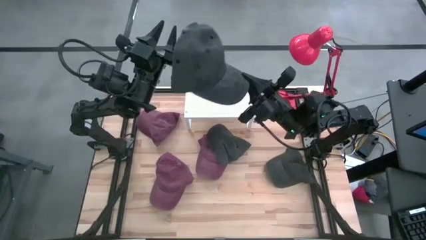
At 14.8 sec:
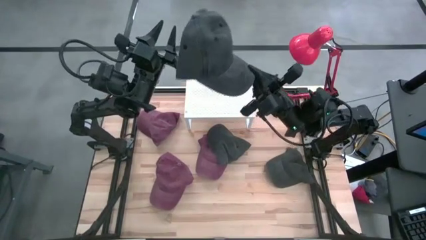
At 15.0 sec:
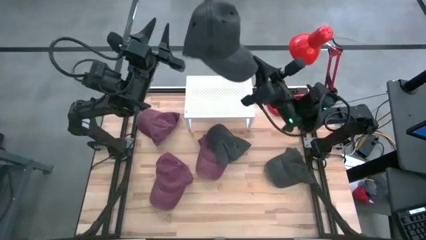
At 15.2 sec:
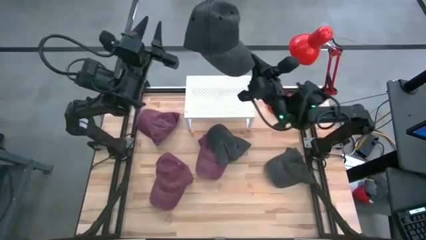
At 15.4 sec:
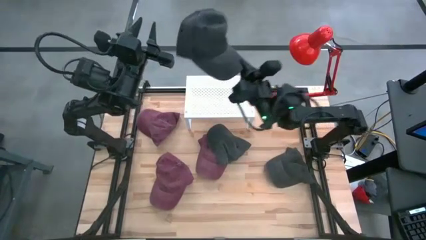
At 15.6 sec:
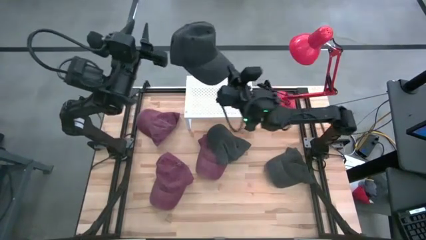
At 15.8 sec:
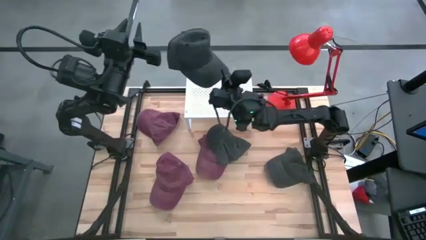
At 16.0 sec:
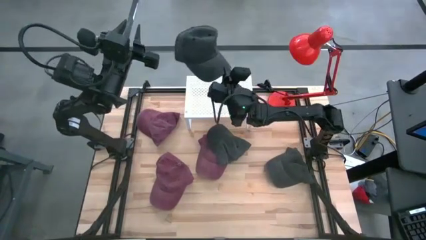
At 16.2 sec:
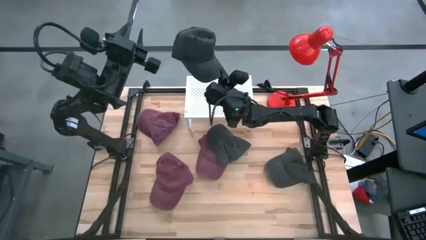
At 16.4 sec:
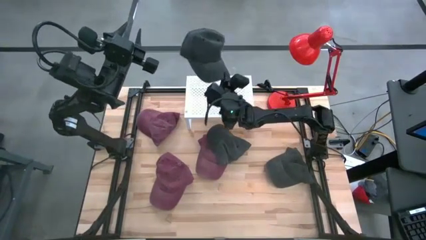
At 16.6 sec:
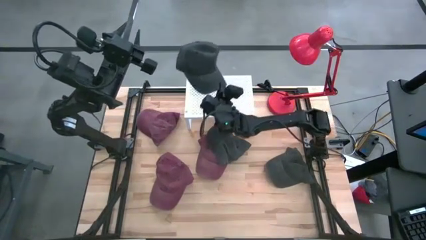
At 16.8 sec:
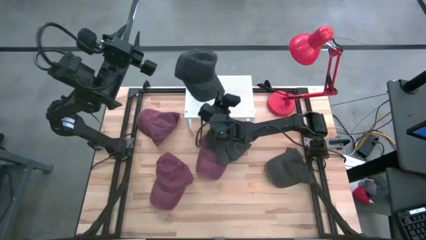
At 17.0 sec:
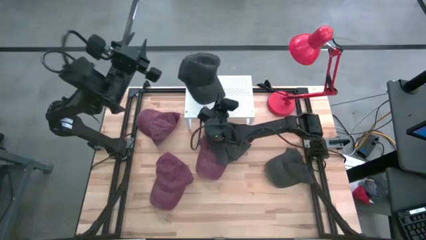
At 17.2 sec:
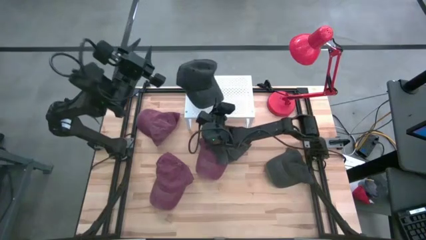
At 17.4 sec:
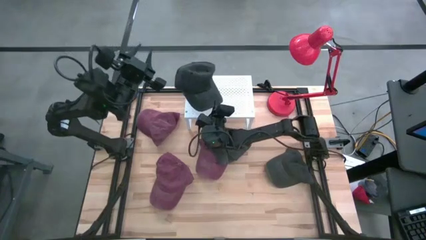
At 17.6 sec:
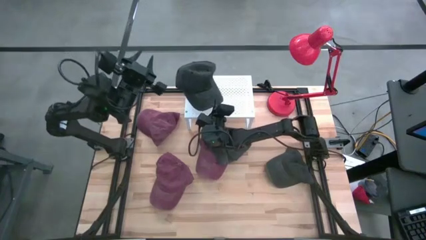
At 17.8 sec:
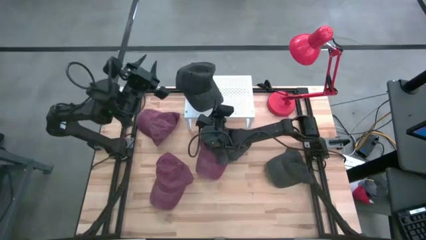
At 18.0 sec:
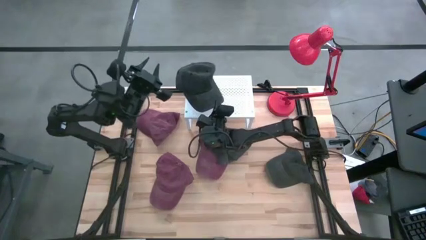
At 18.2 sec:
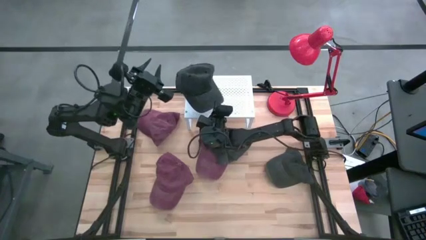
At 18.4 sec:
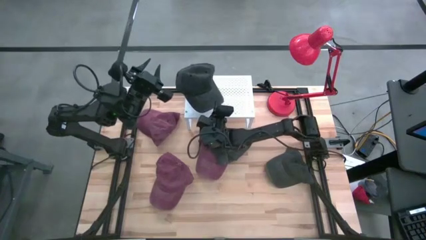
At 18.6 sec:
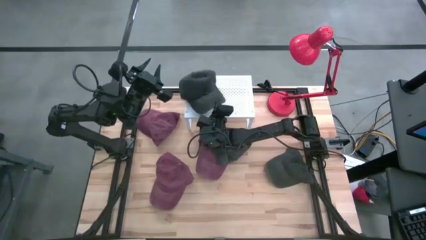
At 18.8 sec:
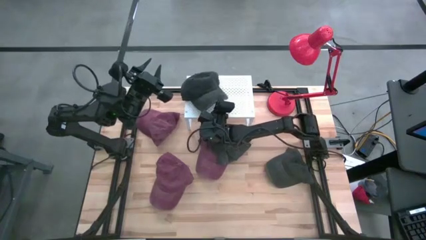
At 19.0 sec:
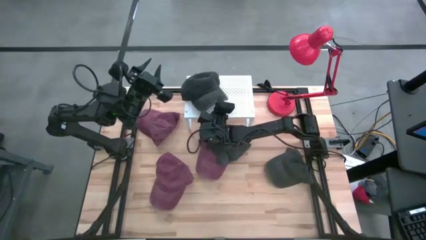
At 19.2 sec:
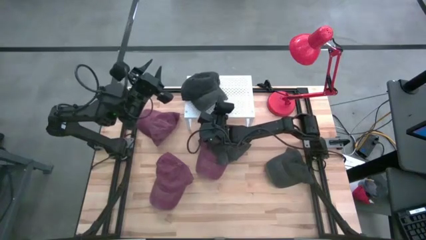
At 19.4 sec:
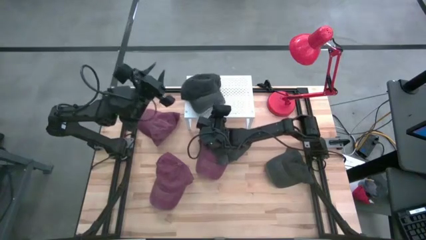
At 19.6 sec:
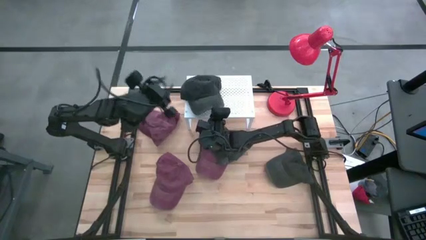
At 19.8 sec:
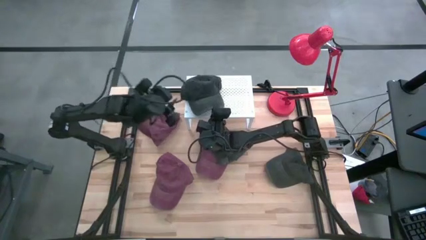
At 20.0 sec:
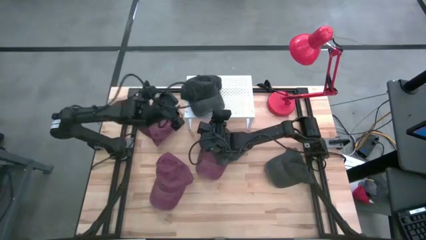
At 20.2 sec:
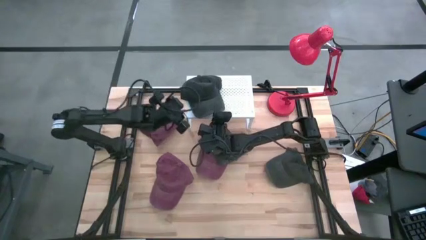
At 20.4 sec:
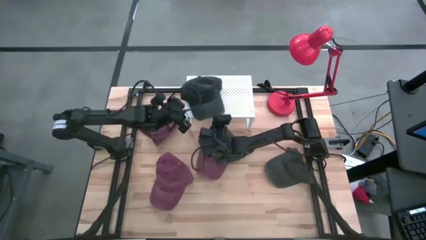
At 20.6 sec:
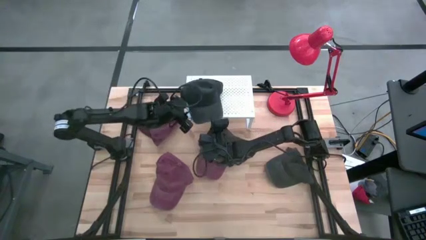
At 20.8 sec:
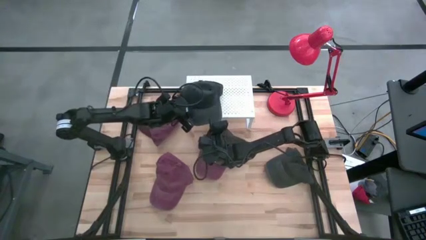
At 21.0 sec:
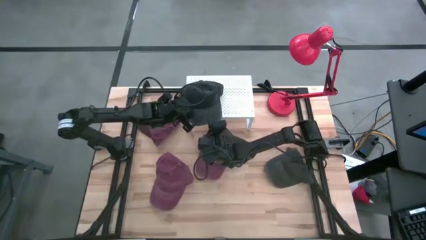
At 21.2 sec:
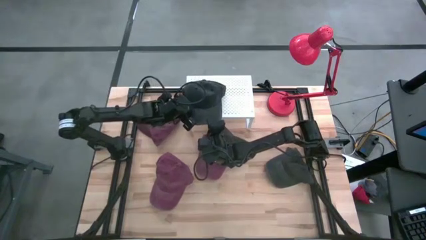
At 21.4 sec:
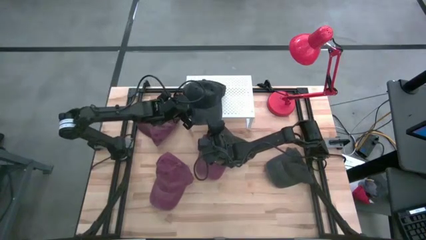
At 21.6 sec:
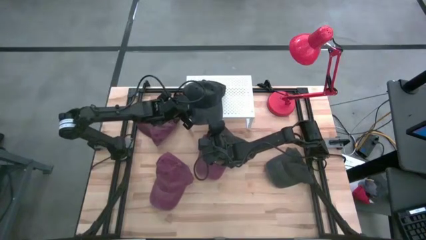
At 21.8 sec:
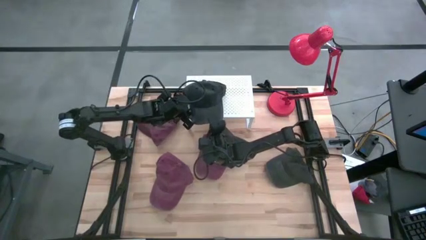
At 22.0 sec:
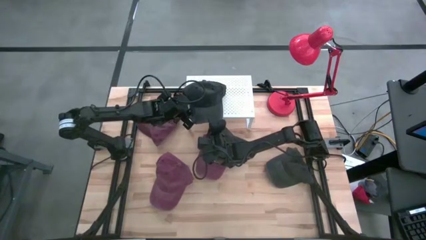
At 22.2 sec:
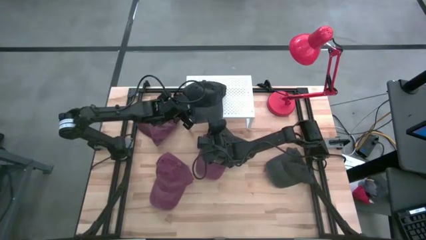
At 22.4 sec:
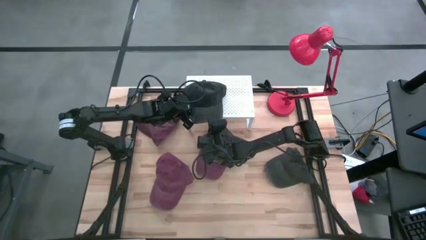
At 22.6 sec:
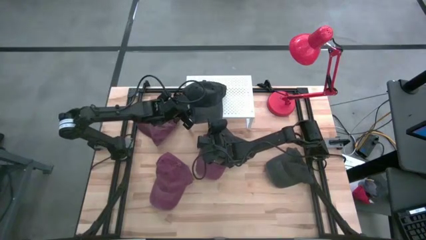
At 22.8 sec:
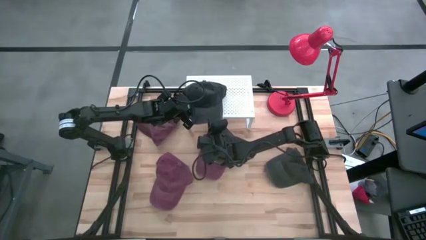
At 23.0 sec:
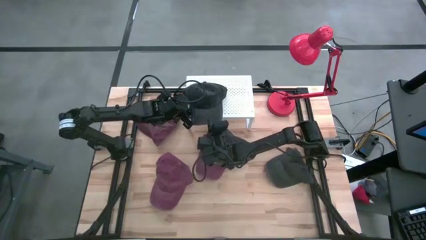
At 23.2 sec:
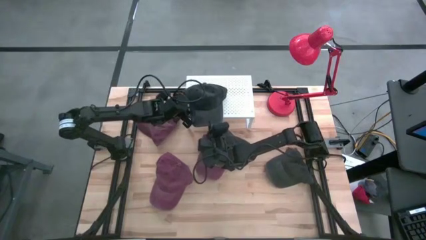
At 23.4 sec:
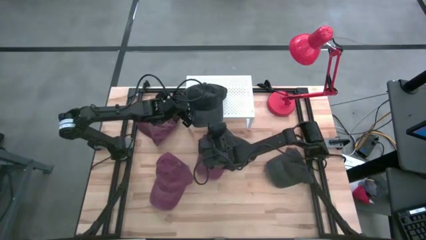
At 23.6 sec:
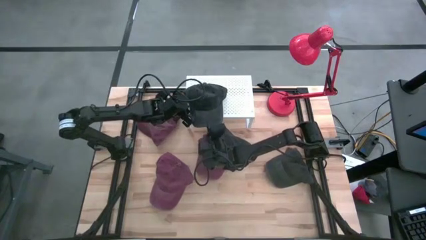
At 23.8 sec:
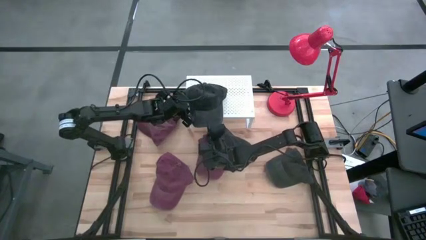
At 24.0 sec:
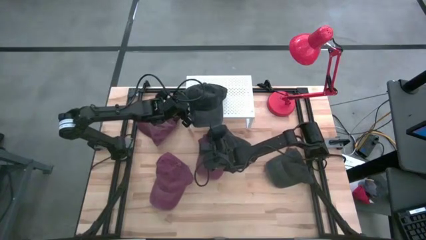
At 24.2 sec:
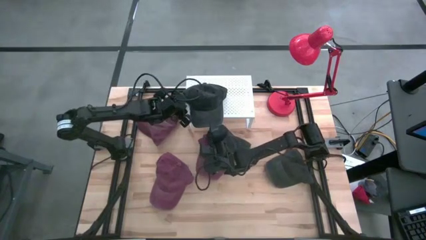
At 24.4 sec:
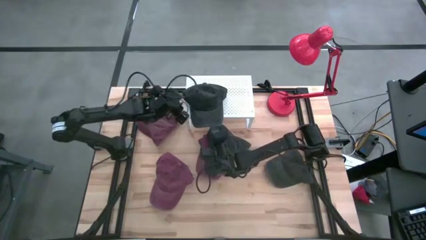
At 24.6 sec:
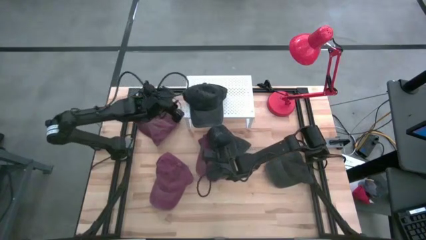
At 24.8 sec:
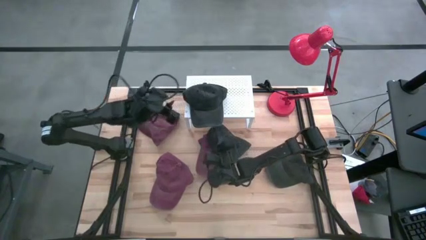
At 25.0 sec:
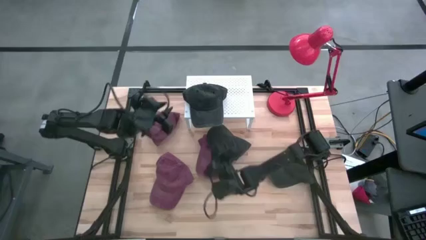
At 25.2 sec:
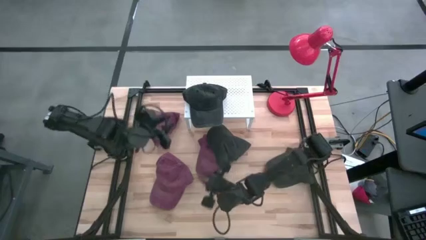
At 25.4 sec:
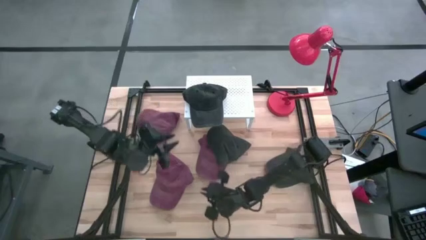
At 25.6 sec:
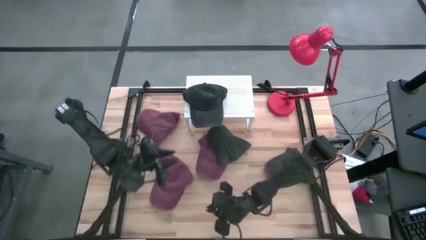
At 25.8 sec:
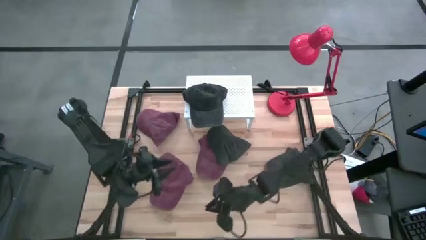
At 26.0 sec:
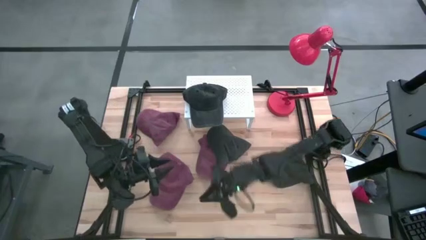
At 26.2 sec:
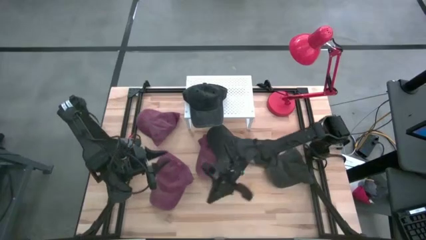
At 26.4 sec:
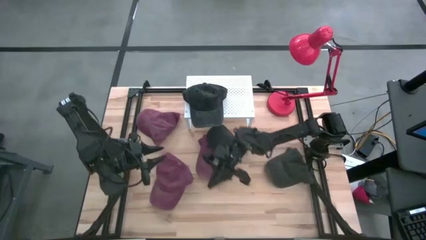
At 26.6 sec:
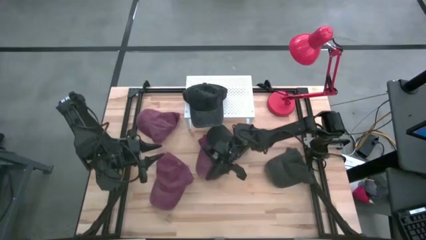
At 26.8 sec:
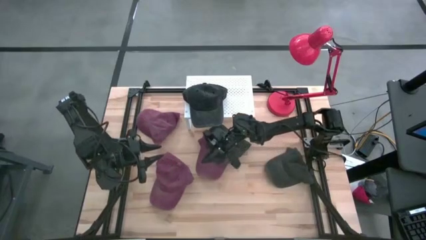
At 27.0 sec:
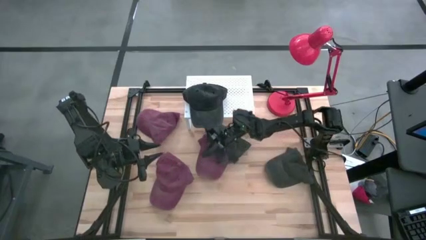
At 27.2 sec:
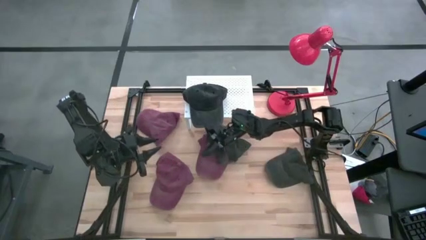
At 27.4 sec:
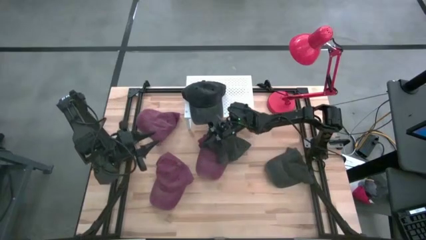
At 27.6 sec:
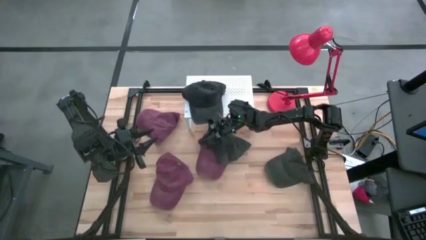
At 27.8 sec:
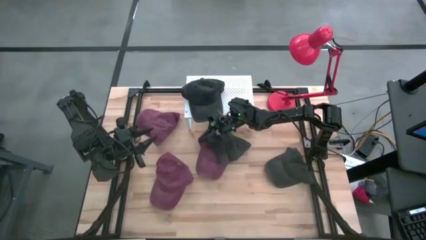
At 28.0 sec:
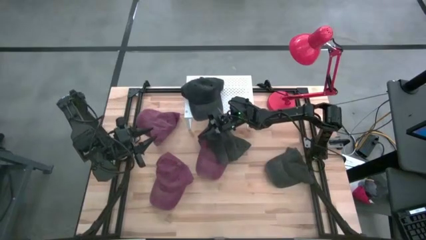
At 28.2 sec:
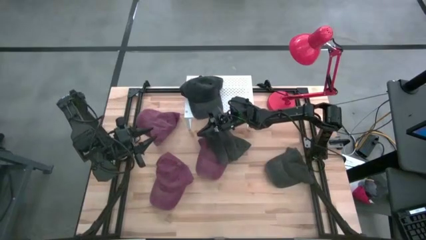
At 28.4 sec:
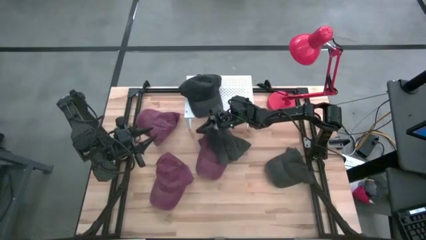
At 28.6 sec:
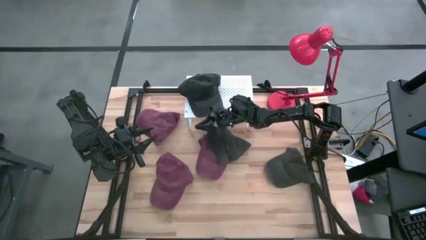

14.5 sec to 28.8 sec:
Task: Pick & Place hat
Put the bottom left black cap on the shelf

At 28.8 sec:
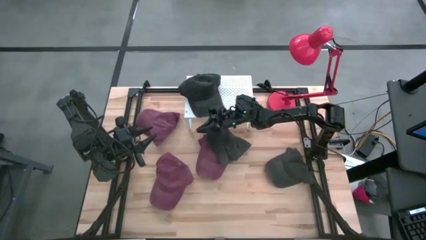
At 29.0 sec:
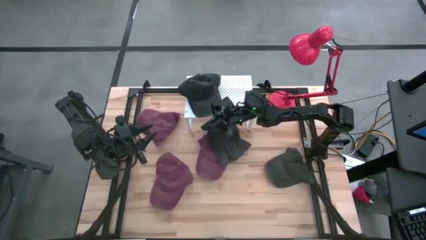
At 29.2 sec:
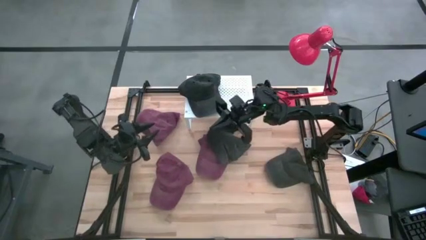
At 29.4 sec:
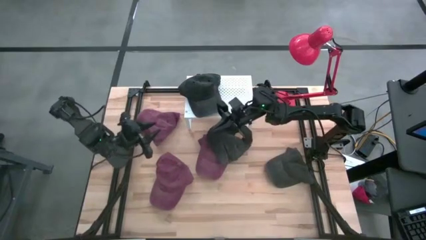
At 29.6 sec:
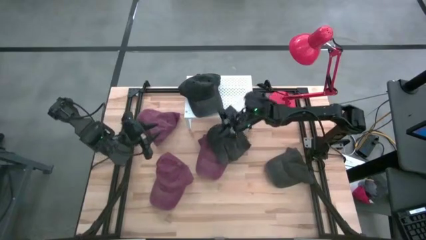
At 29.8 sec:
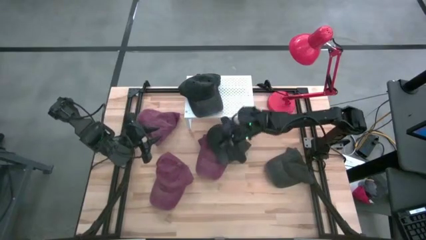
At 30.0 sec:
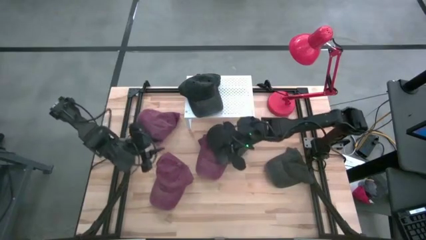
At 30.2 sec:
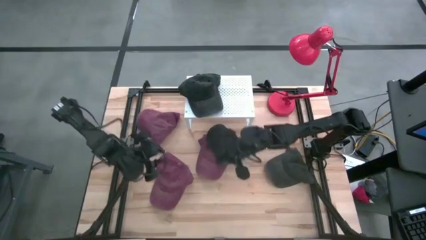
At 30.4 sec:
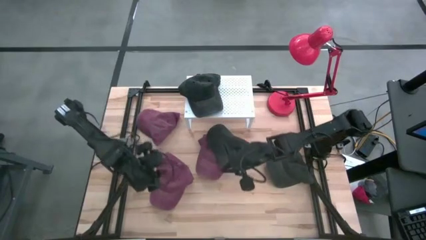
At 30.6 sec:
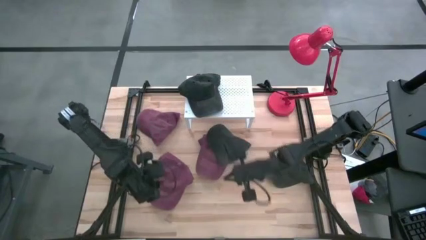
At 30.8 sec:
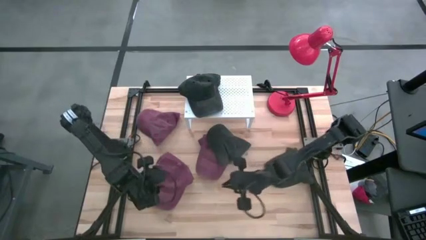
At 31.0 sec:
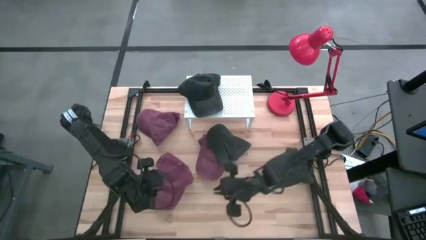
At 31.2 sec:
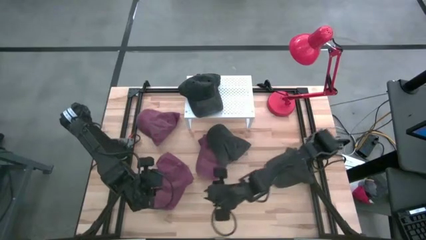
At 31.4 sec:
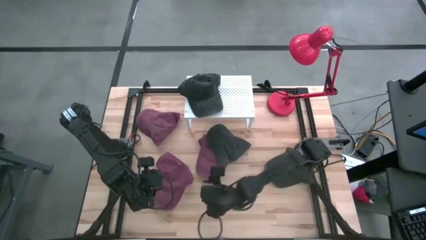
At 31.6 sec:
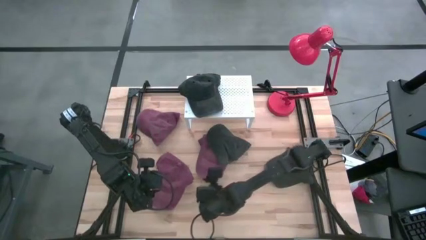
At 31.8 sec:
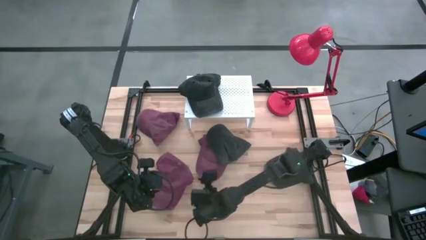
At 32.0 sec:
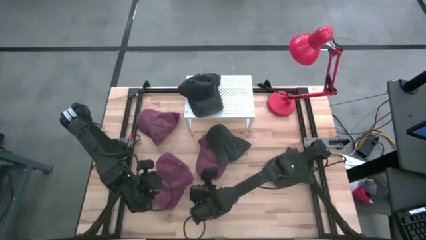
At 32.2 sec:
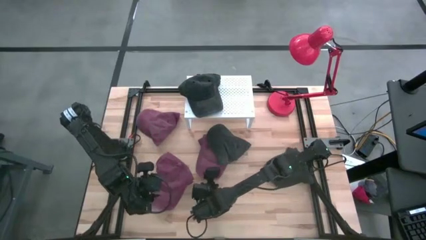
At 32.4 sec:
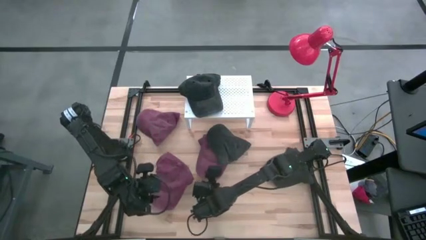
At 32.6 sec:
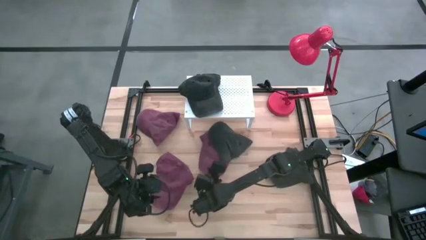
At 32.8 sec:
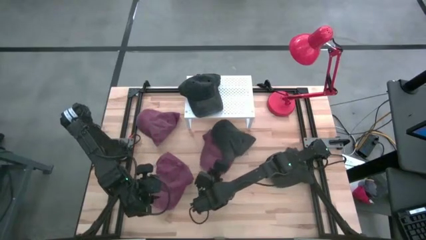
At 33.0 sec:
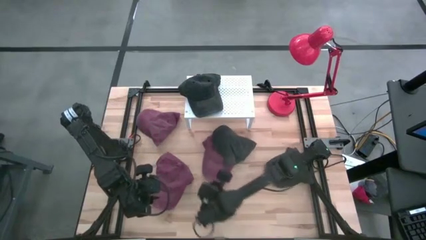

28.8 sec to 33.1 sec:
Put the middle red cap on the shelf
